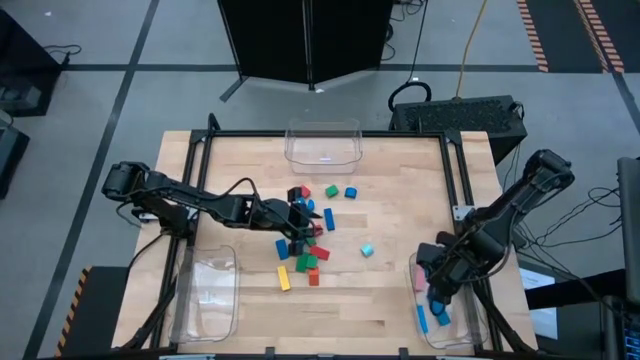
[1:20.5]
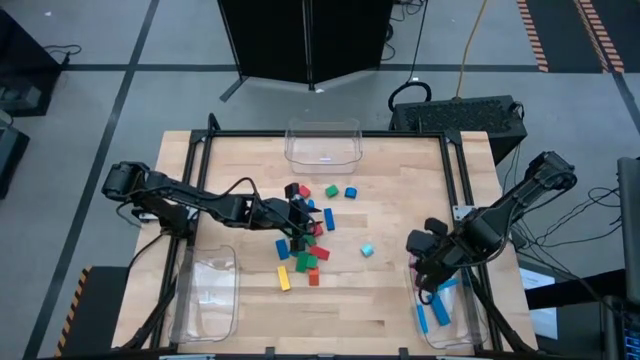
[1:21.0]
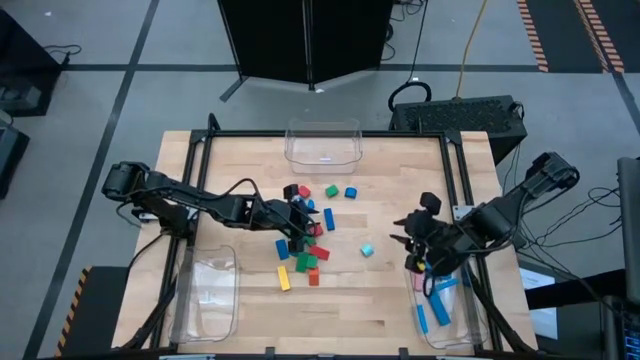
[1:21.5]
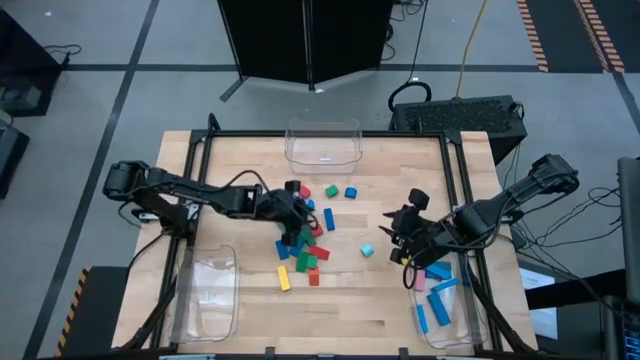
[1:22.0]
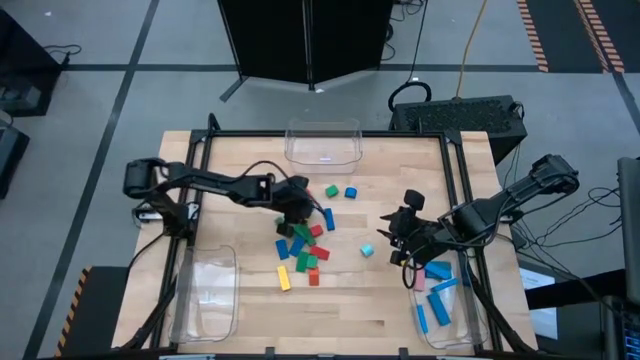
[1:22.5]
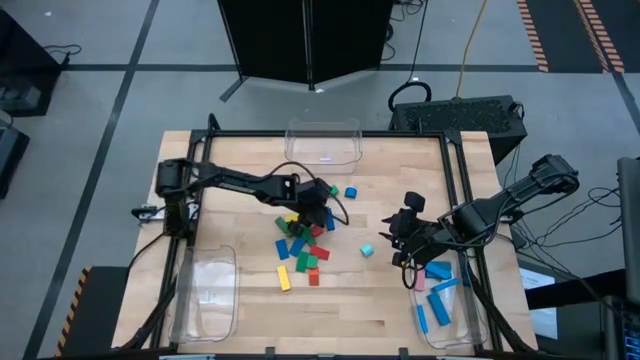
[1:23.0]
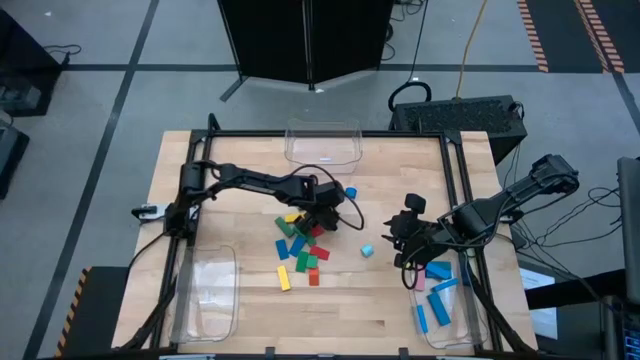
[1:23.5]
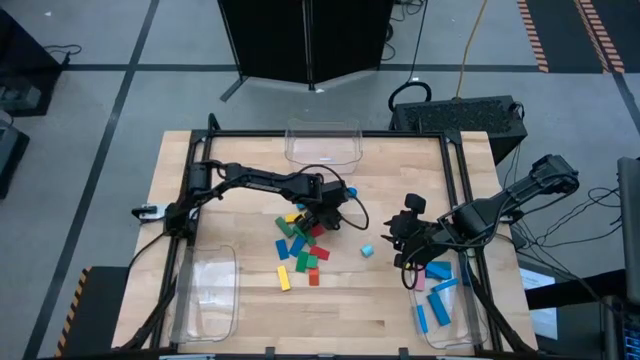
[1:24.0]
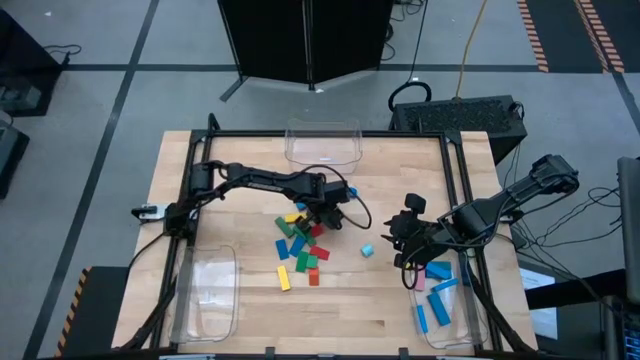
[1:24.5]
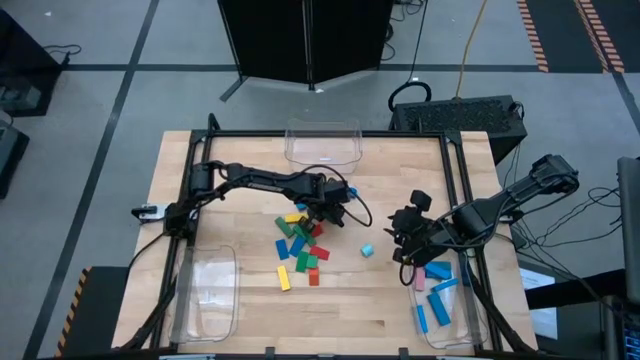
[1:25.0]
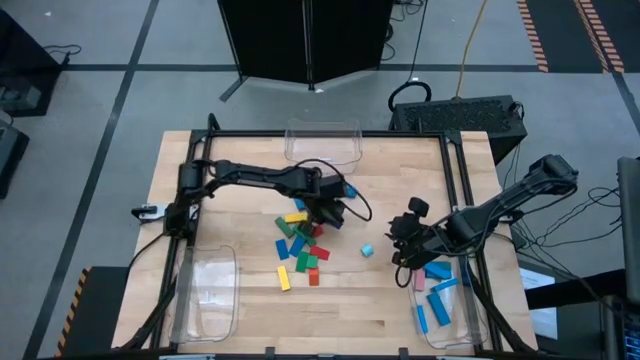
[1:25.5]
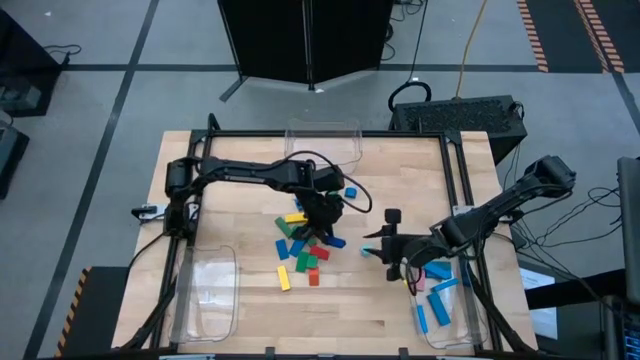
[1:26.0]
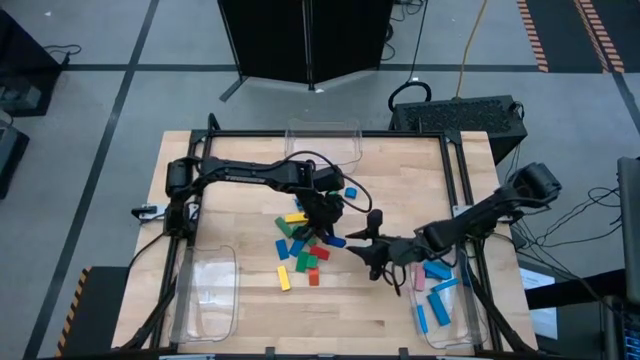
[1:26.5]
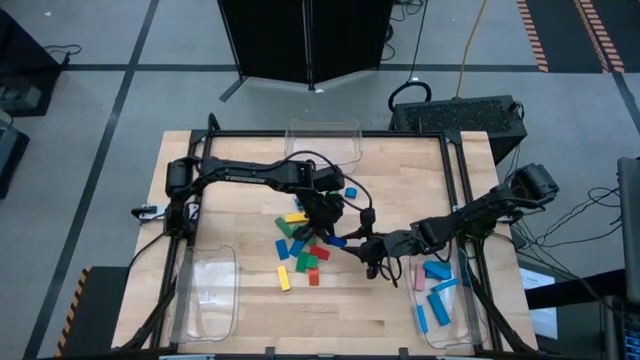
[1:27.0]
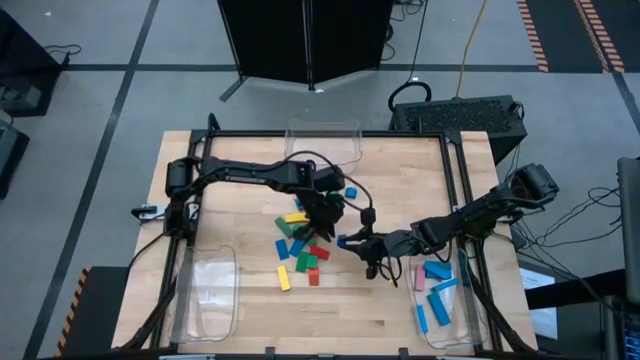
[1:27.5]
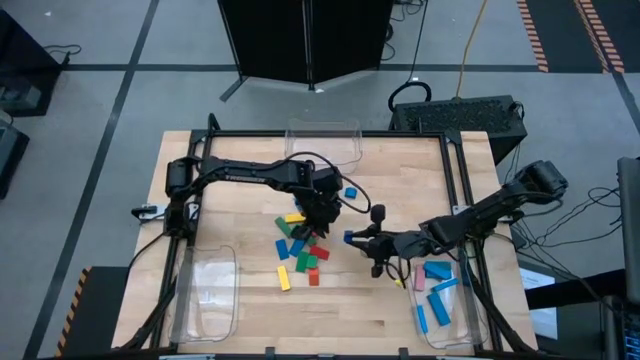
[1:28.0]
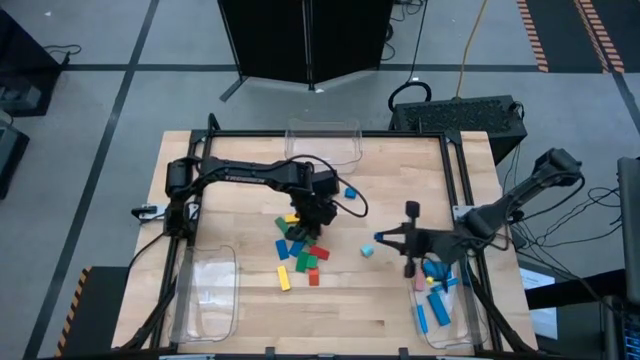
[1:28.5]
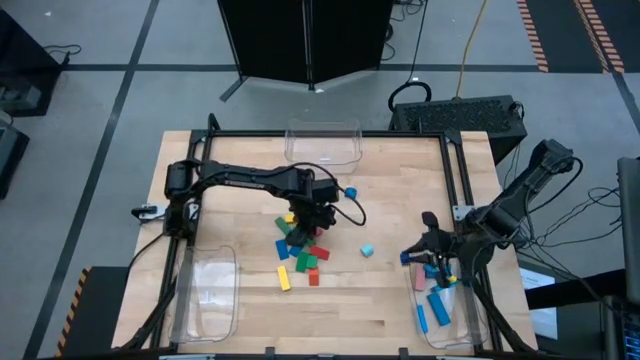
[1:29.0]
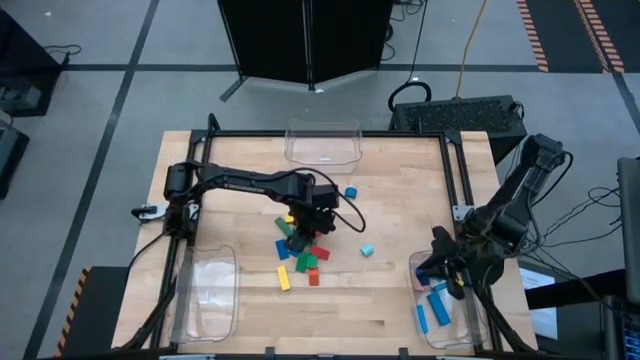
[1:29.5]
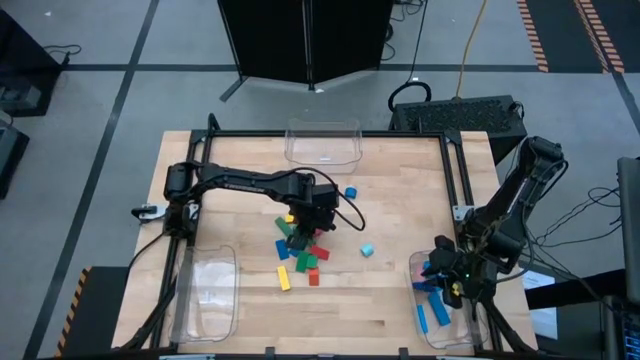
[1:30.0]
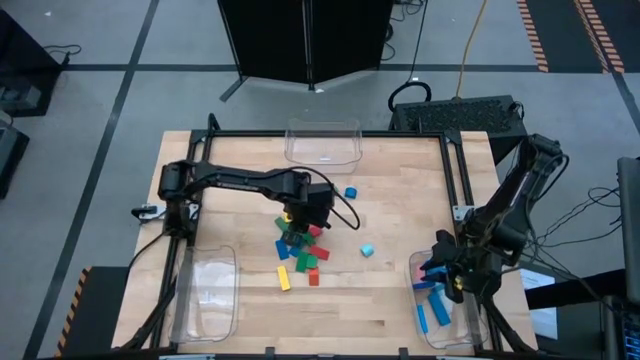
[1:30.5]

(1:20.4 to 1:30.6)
Task: Sort blocks by size
Put the dark blue rectangle block into the bottom right transparent bin

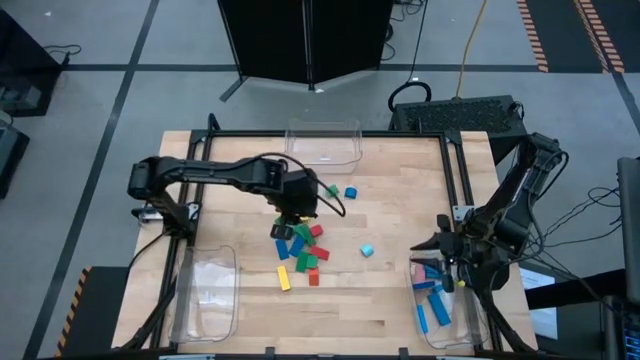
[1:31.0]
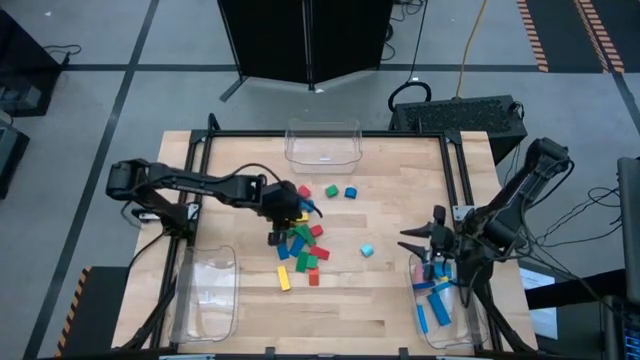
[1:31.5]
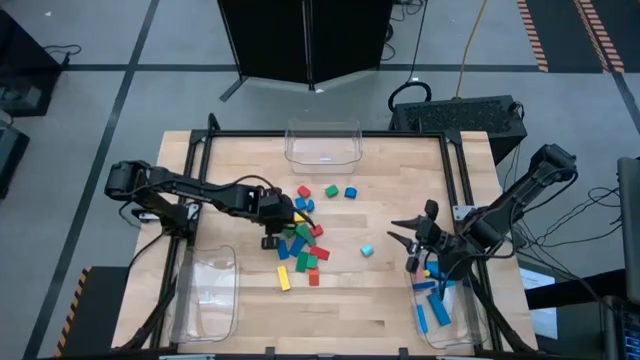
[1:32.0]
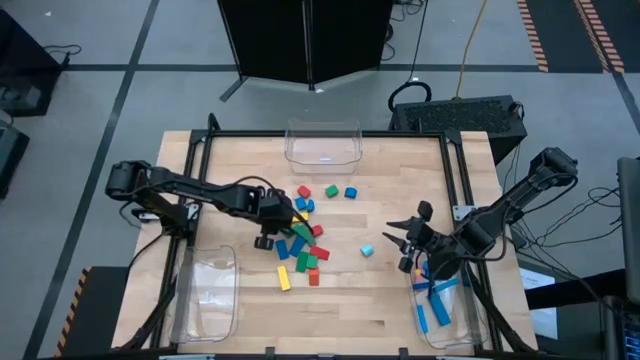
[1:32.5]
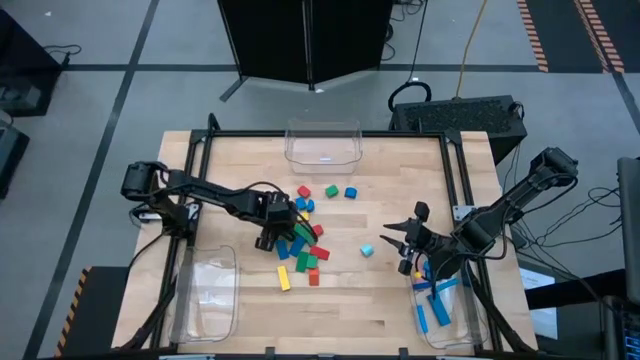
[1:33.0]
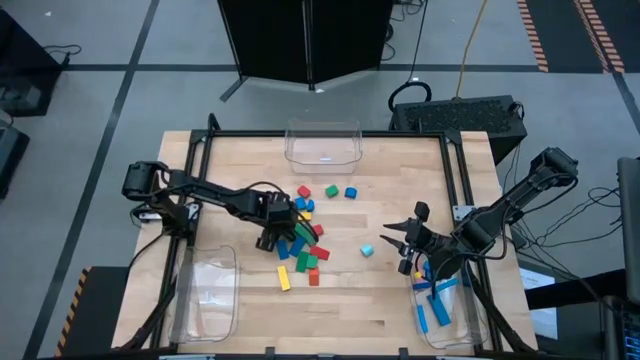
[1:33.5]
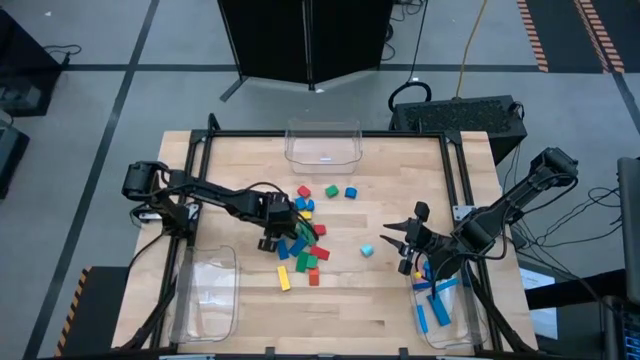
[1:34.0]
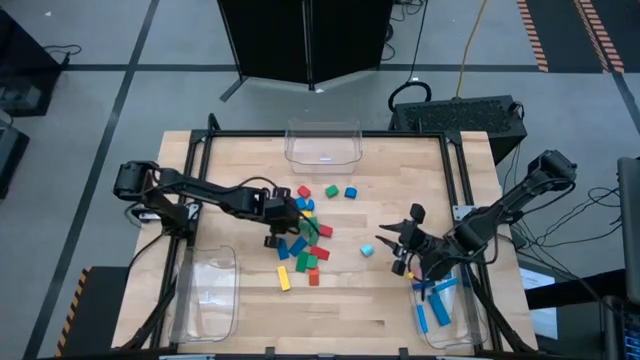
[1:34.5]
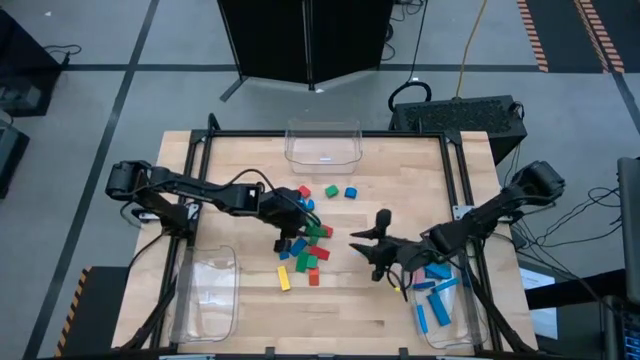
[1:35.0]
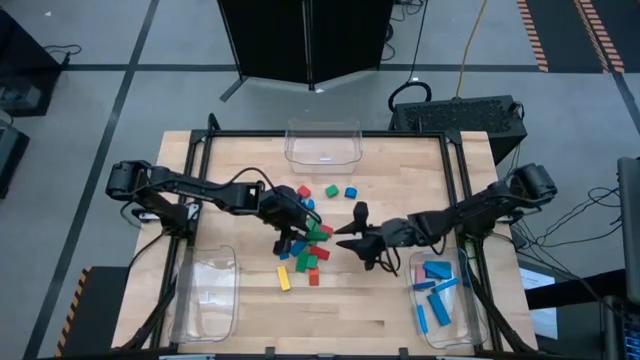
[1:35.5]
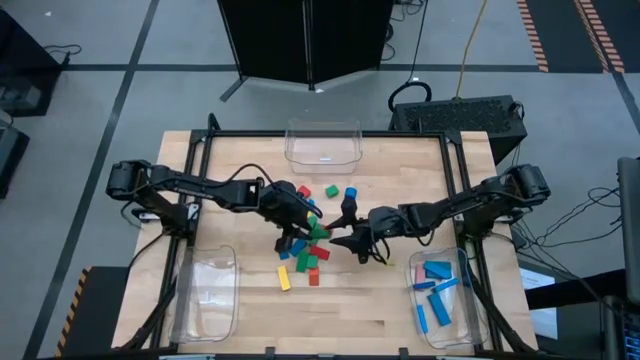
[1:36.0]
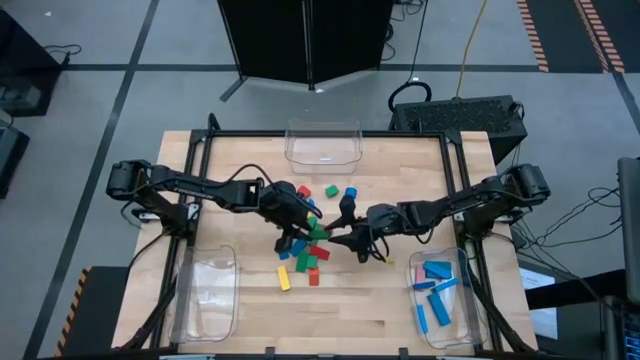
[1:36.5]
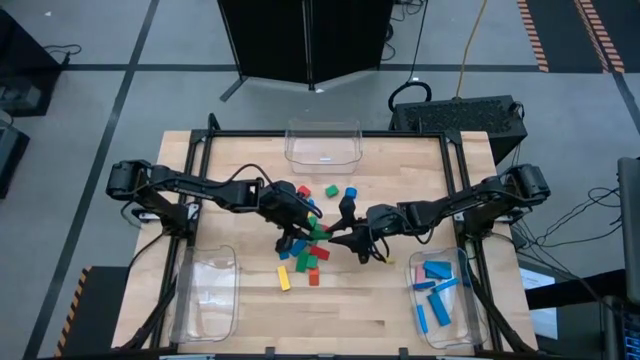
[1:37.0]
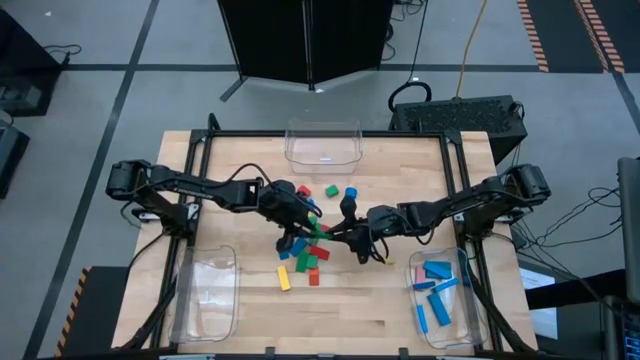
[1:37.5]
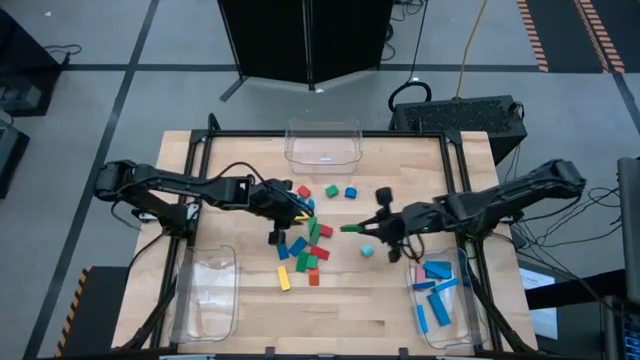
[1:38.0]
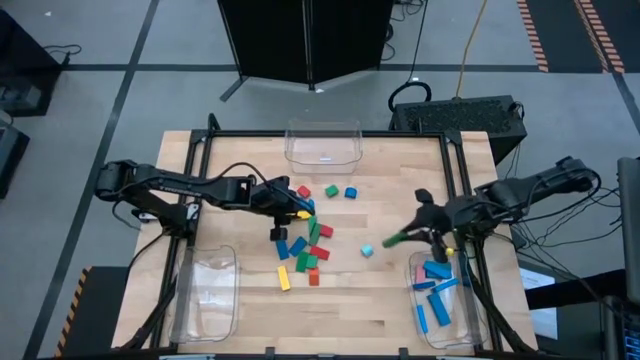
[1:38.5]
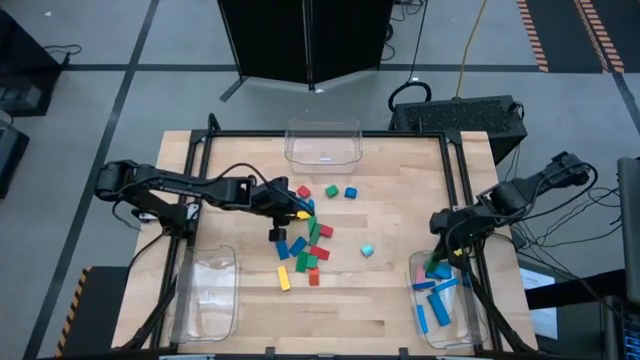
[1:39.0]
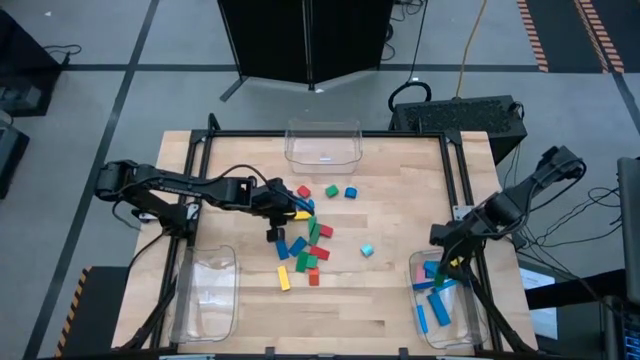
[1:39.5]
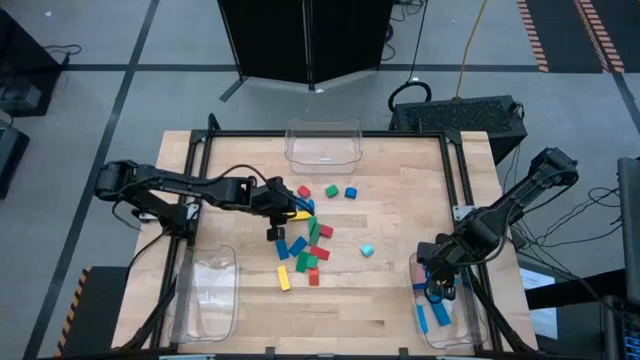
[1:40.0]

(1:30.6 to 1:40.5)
Put the dark green rectangle block into the bottom right transparent bin

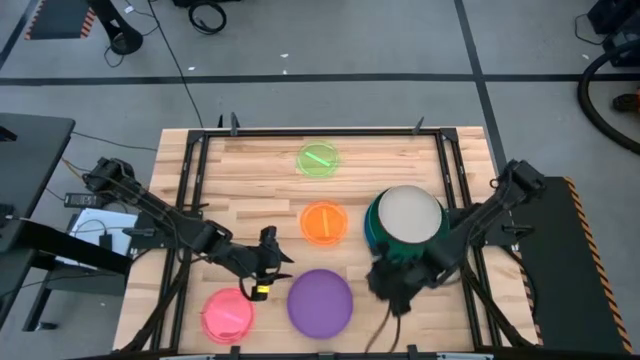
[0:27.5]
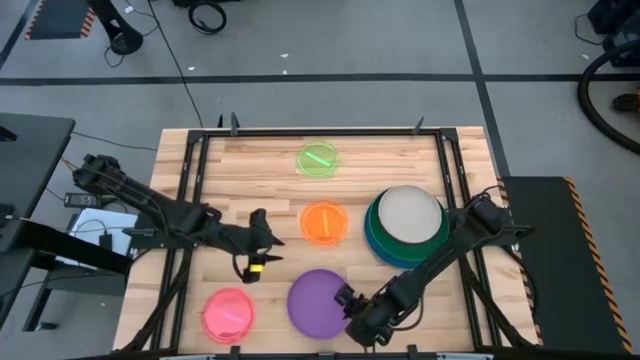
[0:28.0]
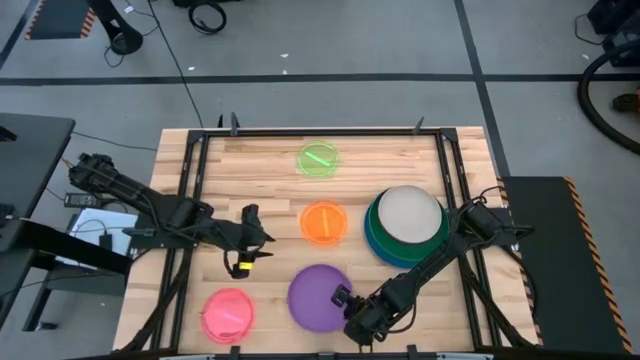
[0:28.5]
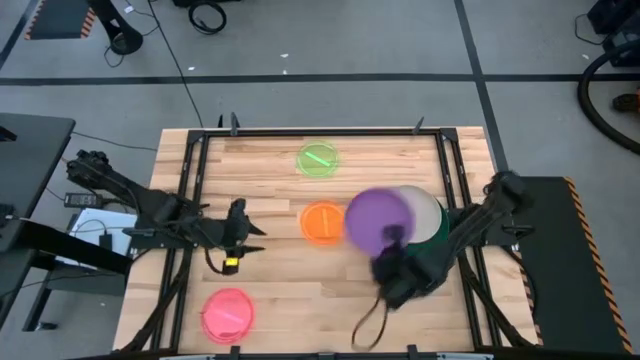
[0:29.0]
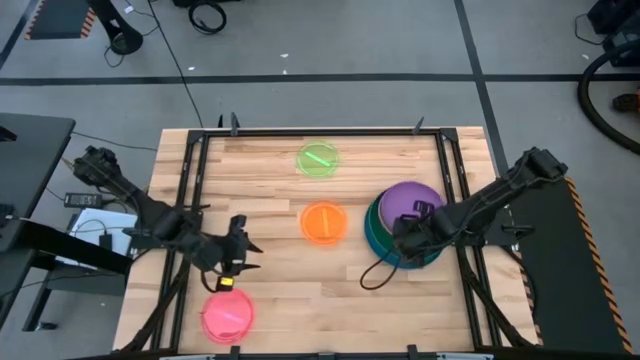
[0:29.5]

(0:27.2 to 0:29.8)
Task: Stack plastic plates
Stack the purple plate on top of the gray plate
